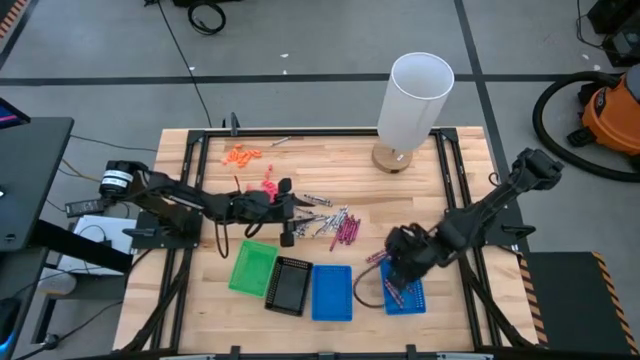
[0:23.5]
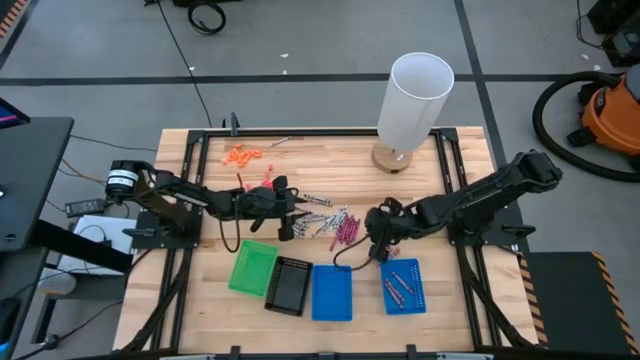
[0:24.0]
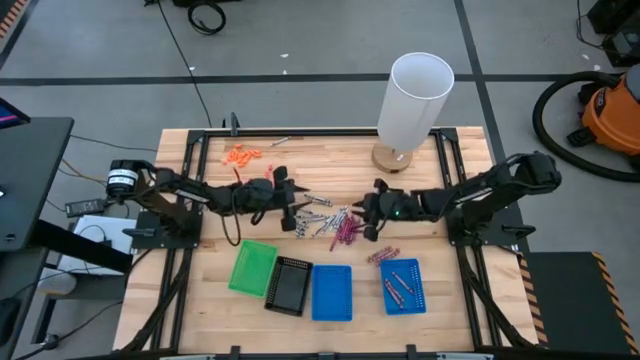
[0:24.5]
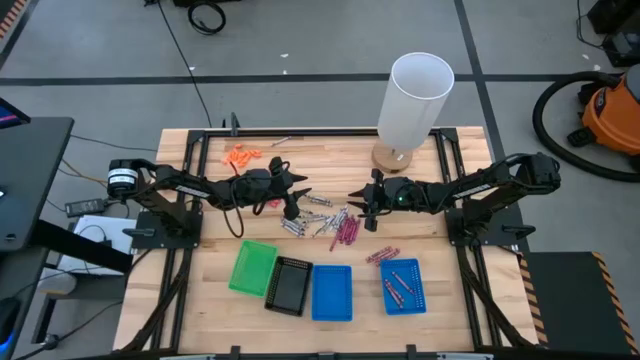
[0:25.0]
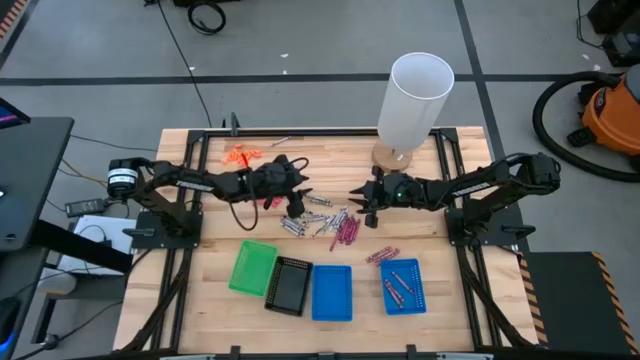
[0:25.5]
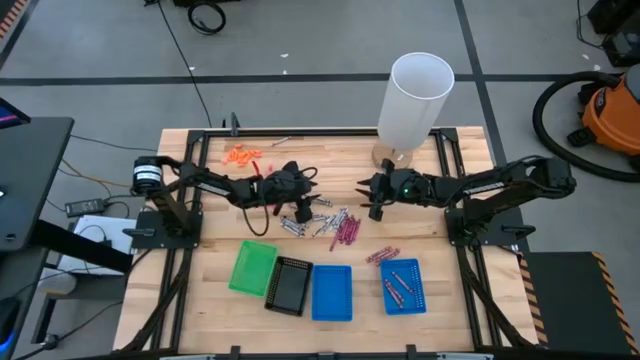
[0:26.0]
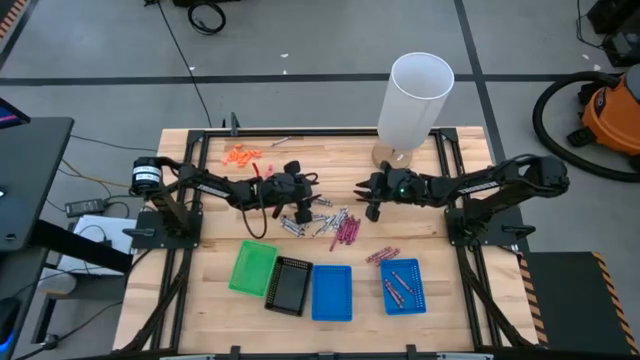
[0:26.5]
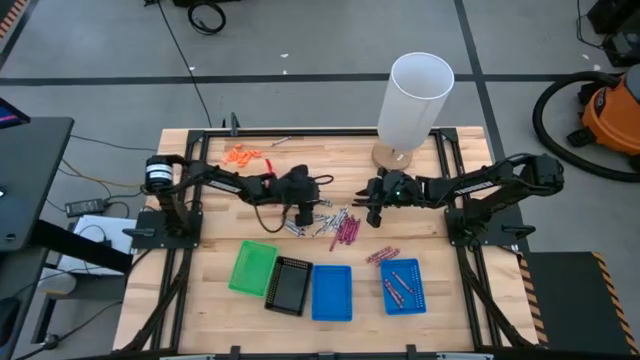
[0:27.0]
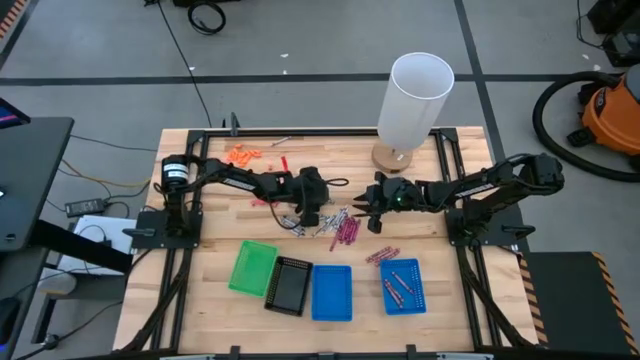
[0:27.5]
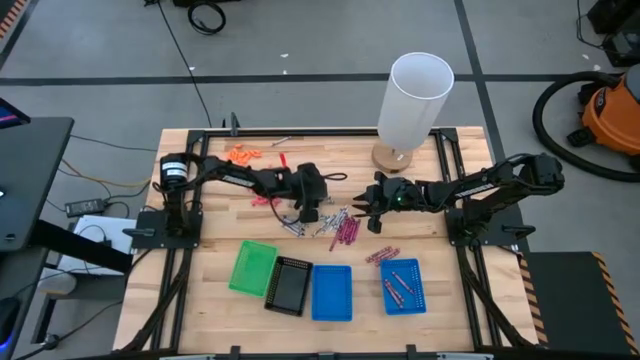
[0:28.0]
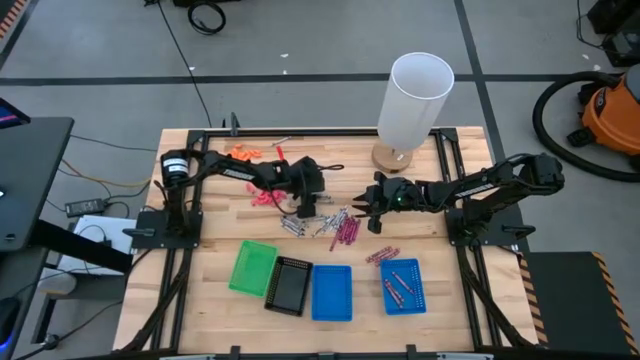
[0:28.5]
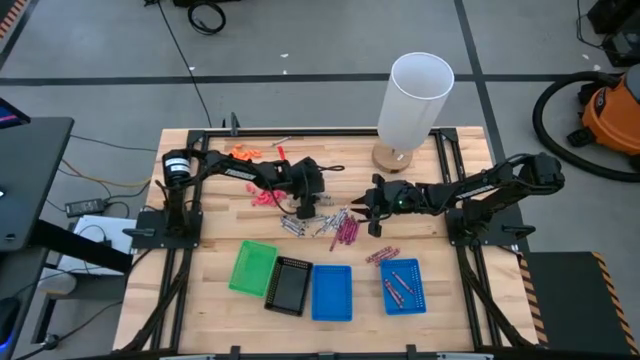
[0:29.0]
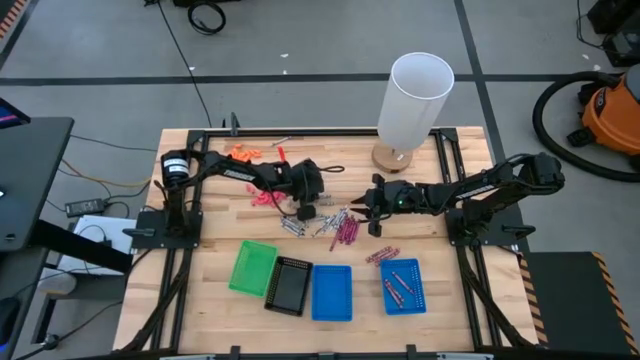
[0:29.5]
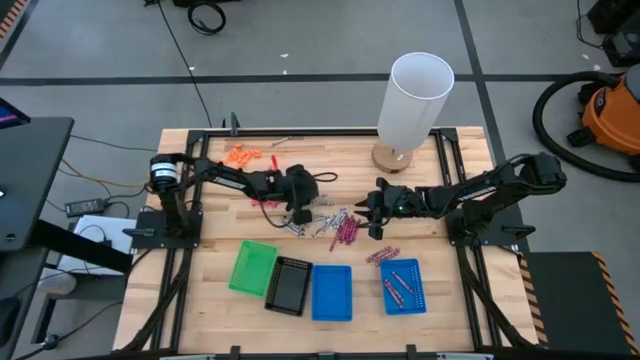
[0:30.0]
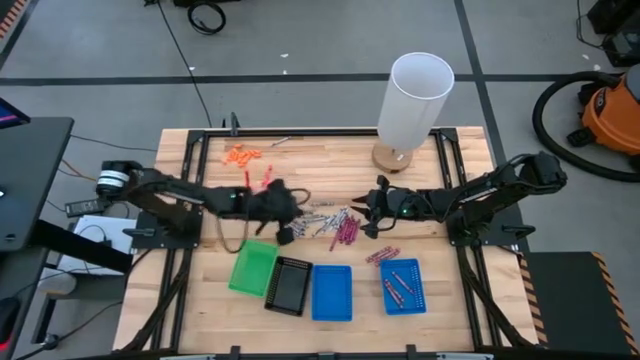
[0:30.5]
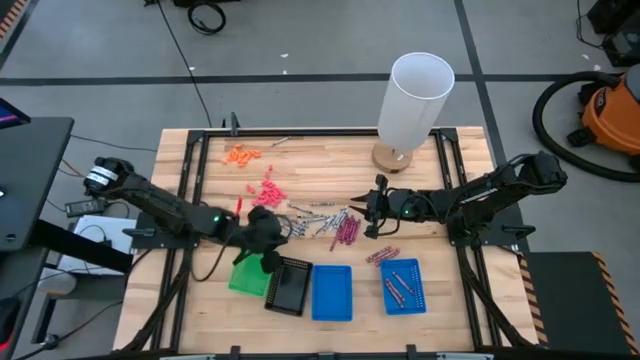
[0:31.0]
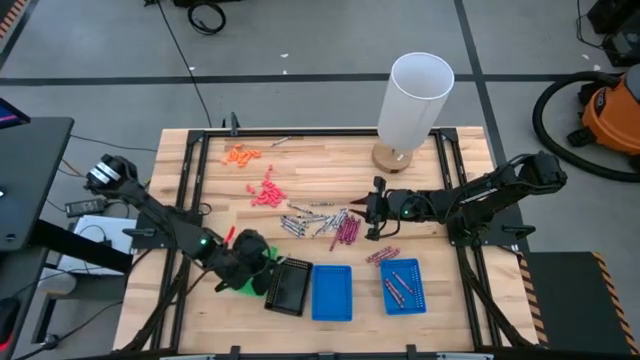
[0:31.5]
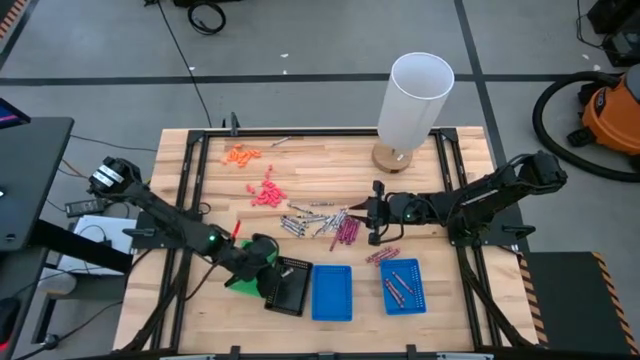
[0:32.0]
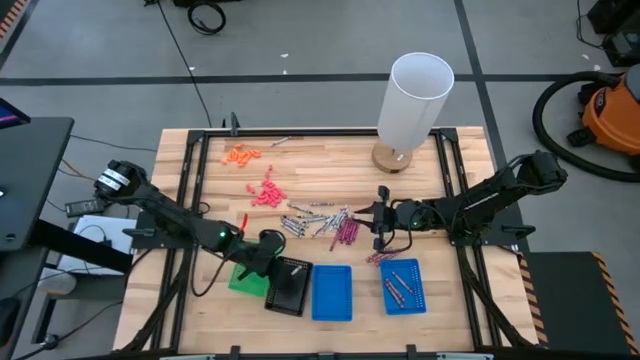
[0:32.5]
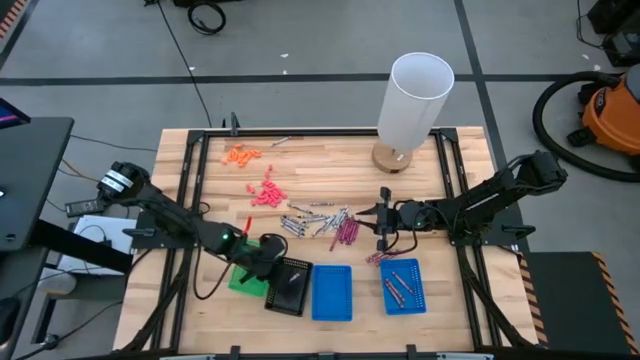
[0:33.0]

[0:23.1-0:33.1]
Task: Sort crayons
Put the black crayon into the black bin

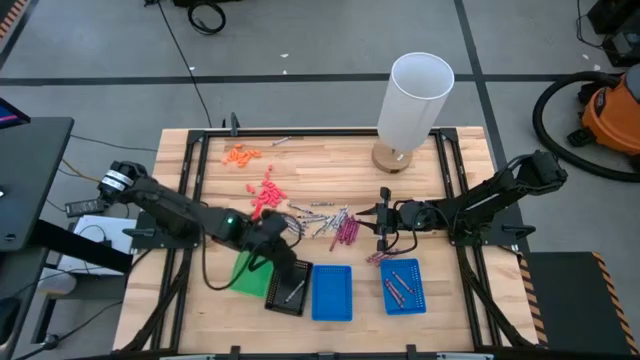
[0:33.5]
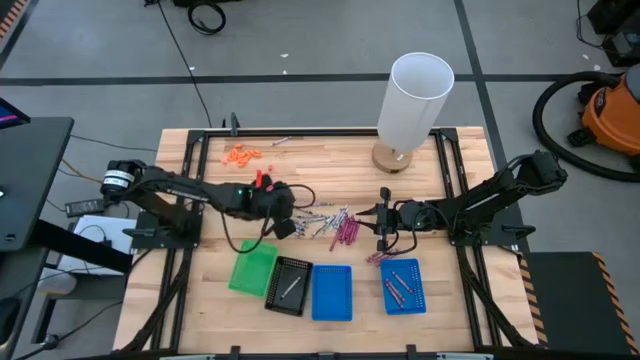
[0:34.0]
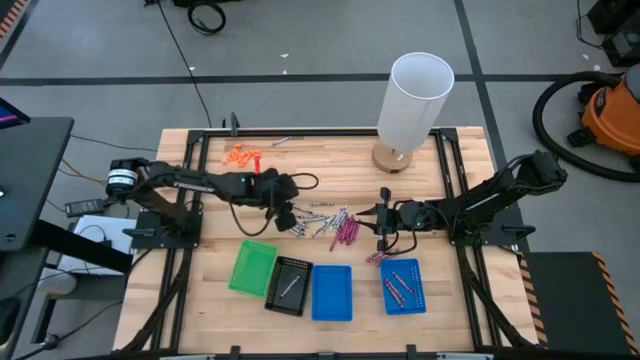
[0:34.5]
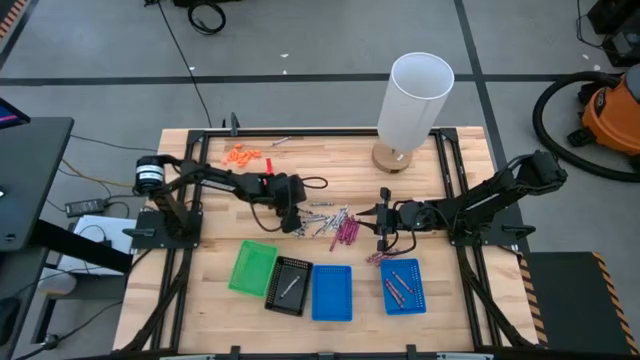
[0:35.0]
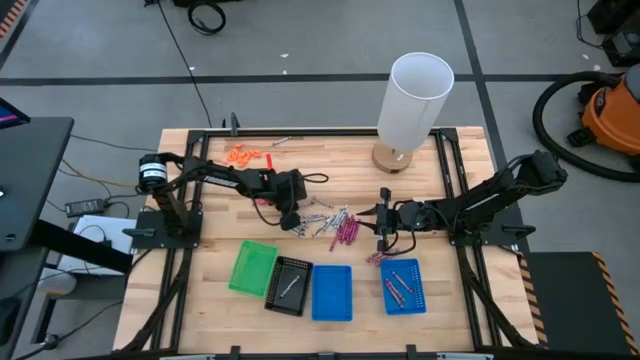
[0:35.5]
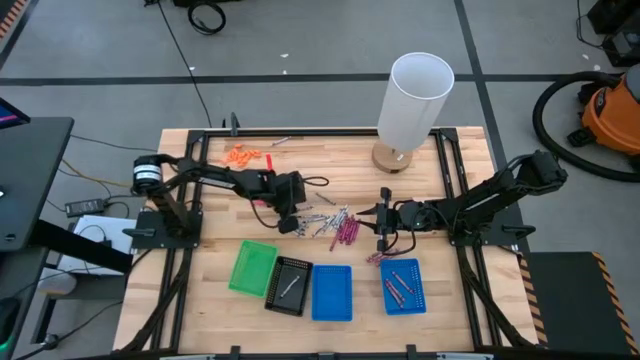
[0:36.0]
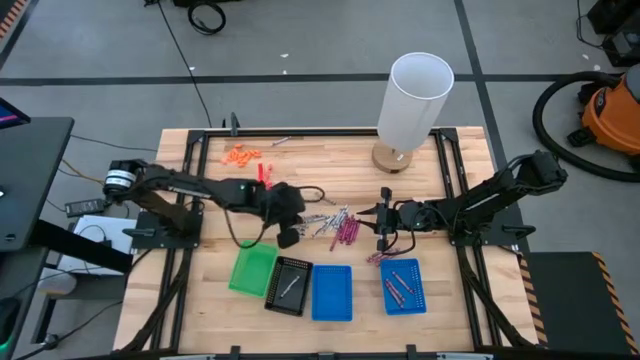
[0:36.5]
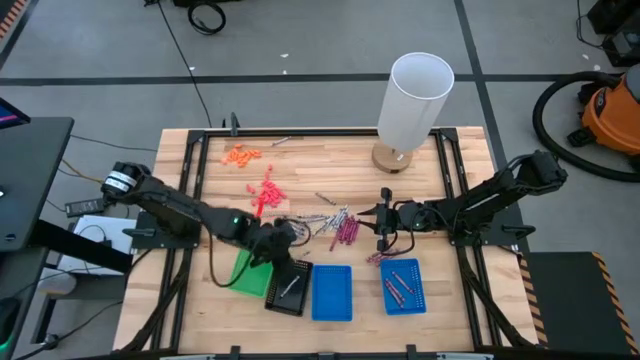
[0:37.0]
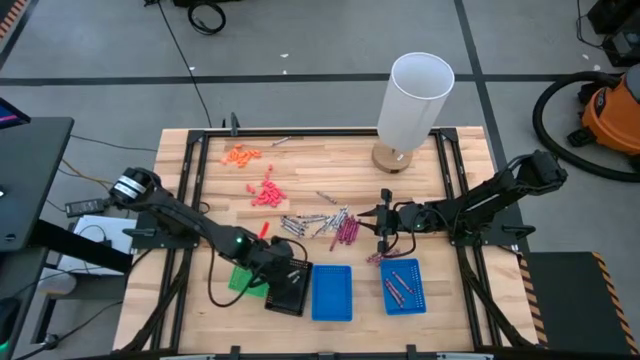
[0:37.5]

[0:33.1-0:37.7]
Put the black crayon into the black bin

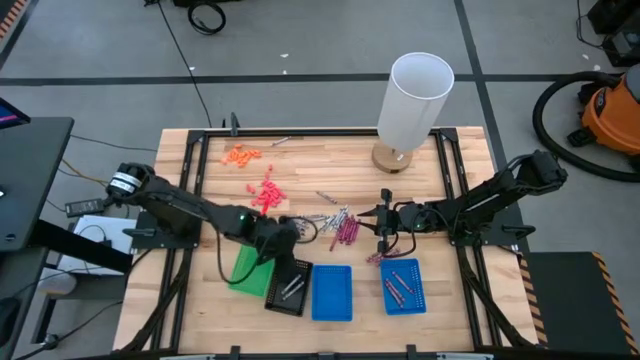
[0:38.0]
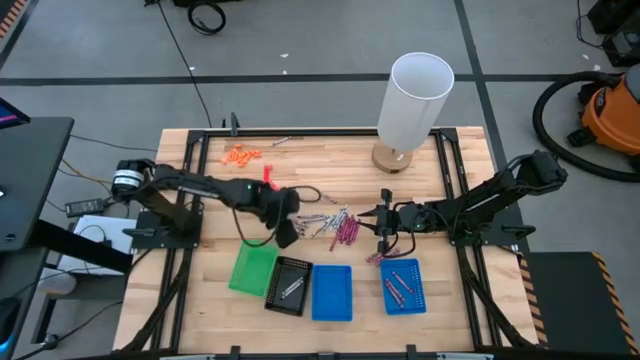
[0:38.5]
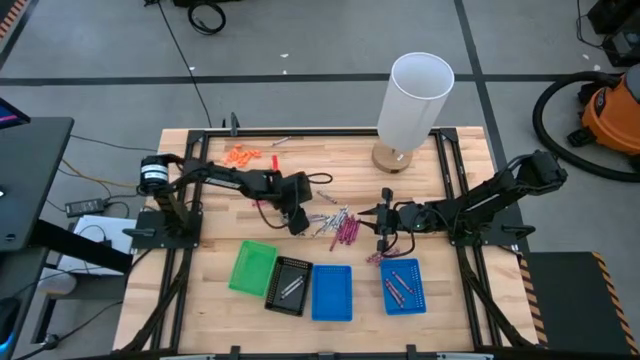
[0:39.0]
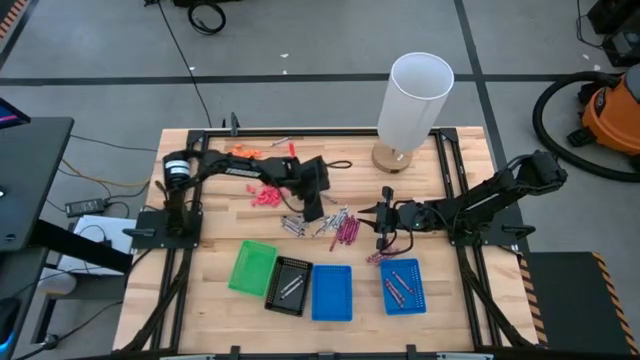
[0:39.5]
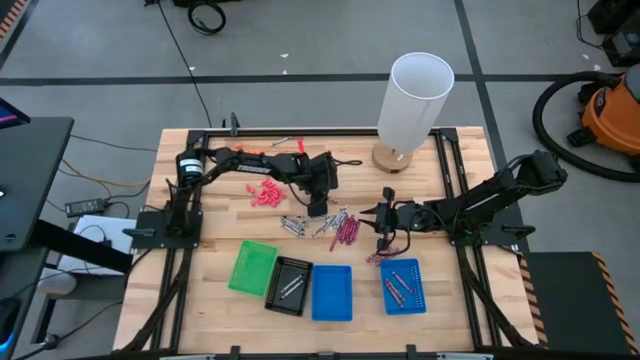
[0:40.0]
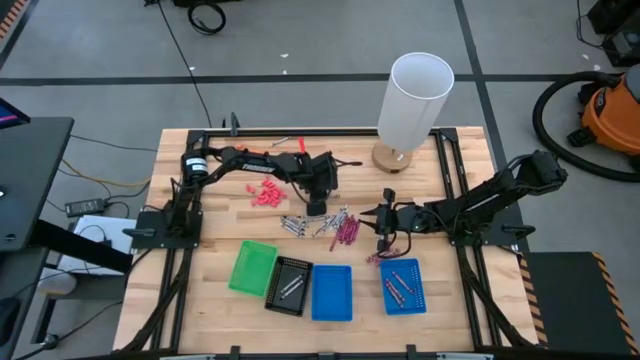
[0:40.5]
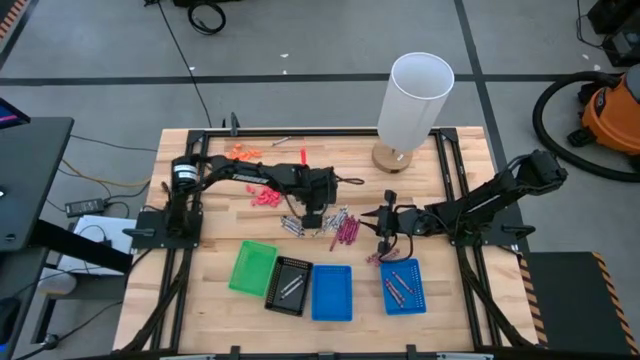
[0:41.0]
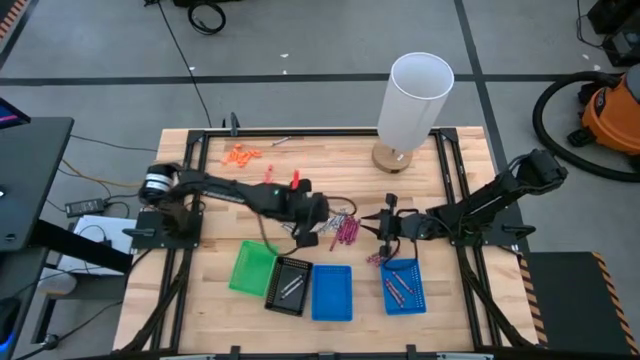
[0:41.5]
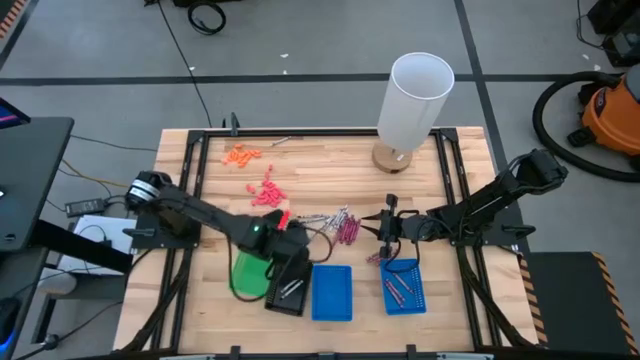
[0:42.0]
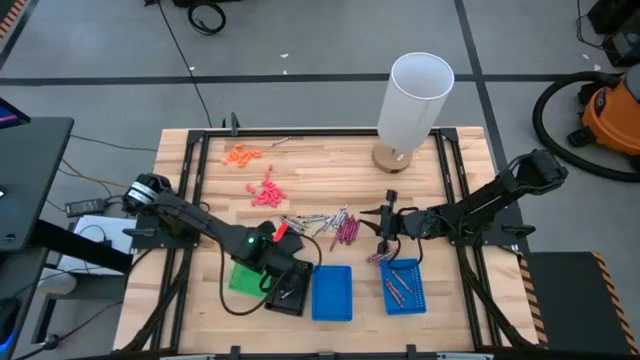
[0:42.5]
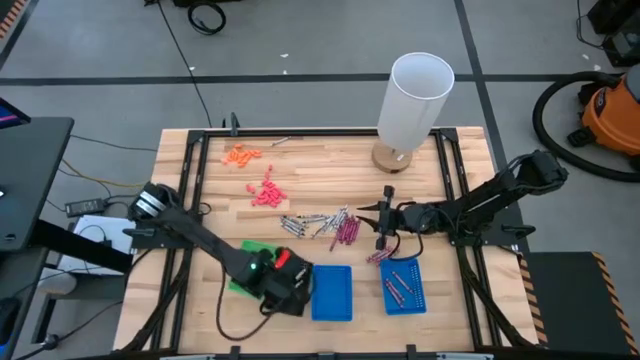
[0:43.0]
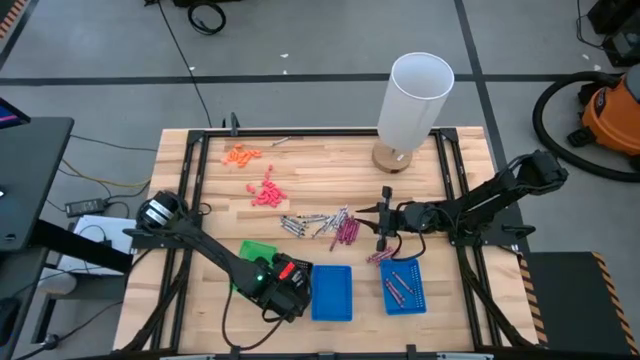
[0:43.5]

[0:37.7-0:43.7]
Put the black crayon into the black bin
